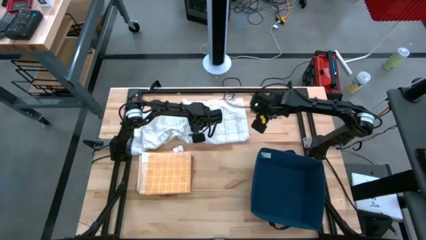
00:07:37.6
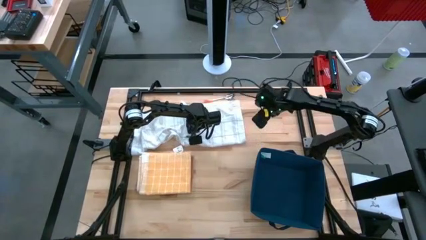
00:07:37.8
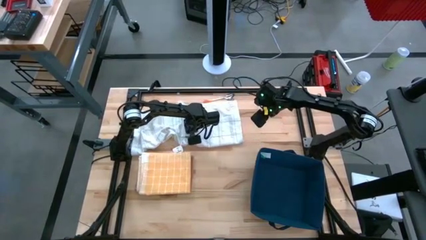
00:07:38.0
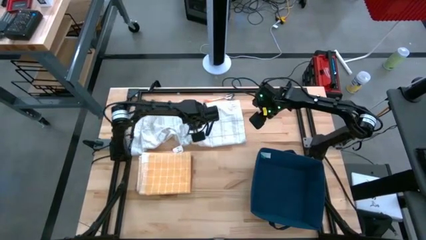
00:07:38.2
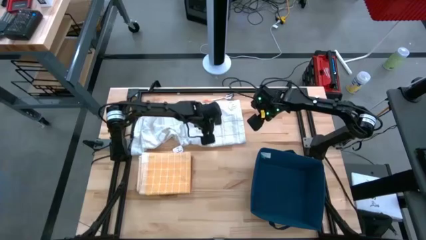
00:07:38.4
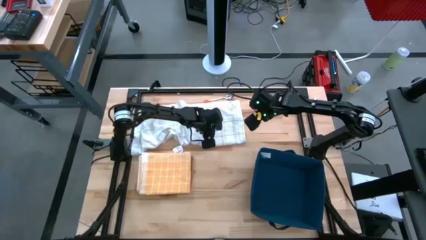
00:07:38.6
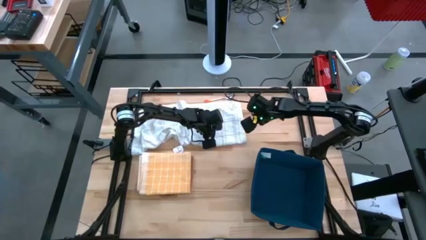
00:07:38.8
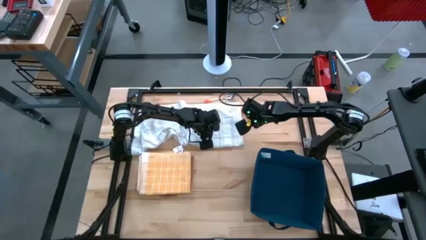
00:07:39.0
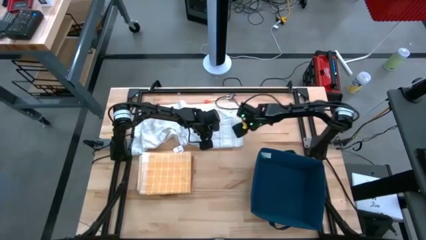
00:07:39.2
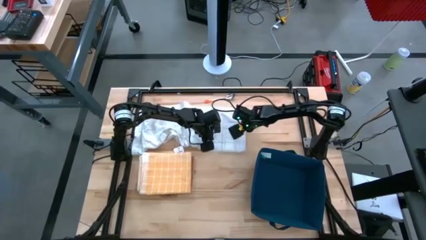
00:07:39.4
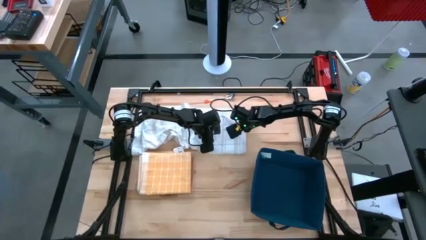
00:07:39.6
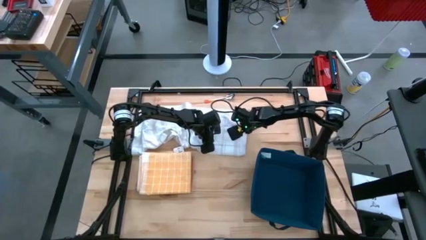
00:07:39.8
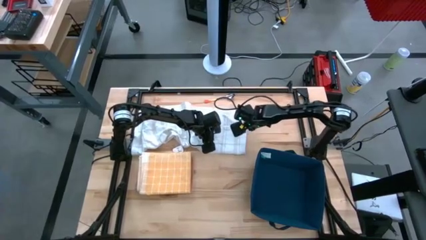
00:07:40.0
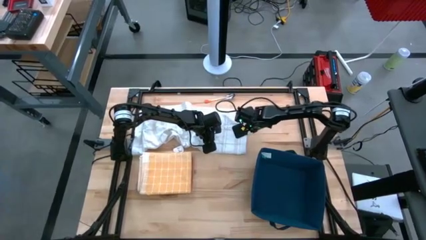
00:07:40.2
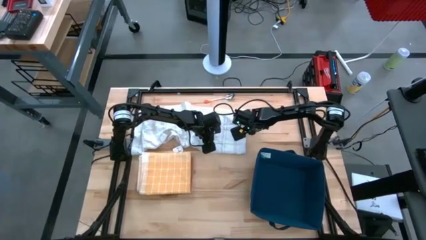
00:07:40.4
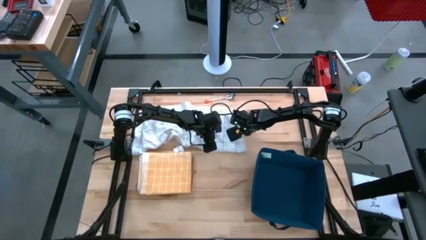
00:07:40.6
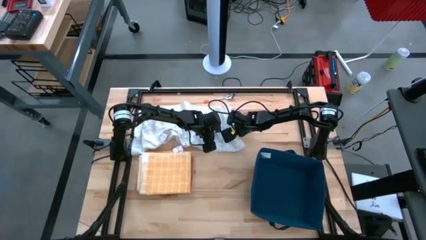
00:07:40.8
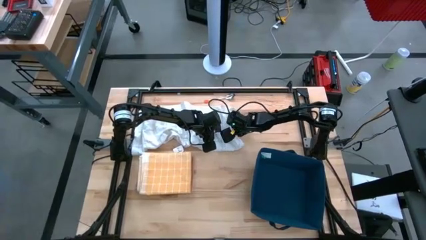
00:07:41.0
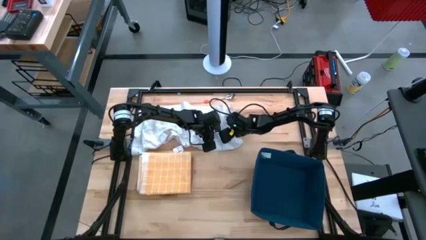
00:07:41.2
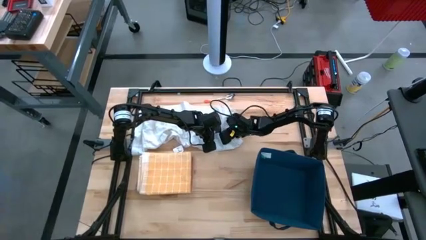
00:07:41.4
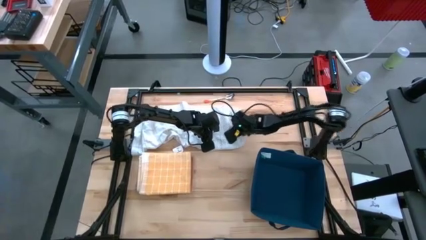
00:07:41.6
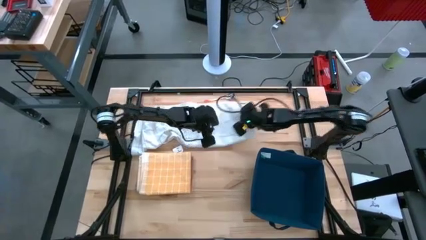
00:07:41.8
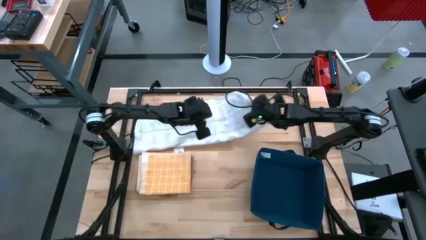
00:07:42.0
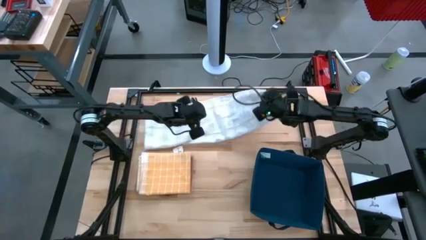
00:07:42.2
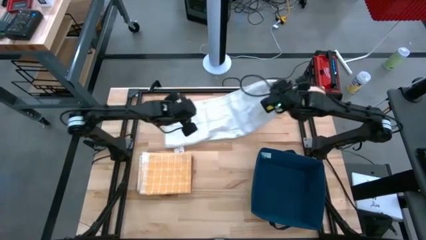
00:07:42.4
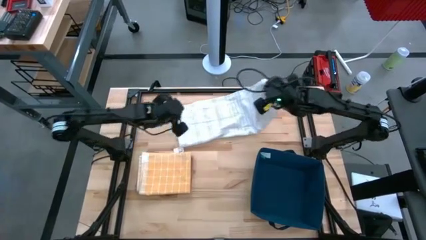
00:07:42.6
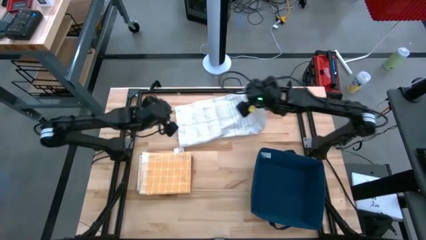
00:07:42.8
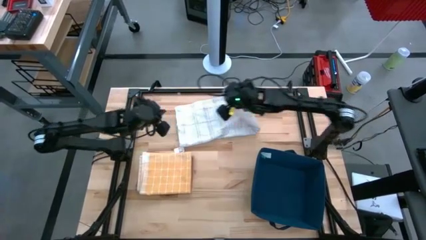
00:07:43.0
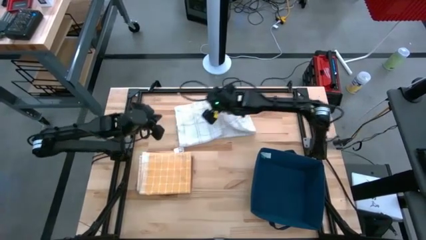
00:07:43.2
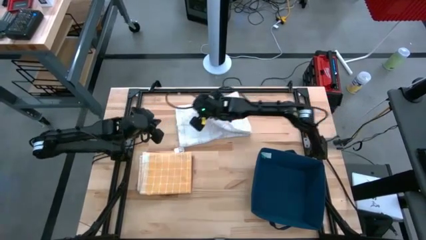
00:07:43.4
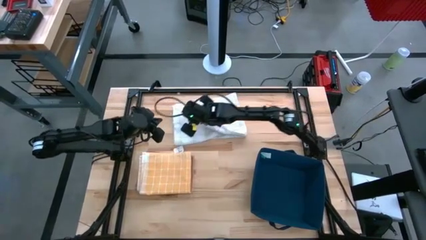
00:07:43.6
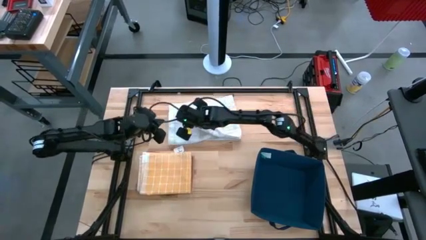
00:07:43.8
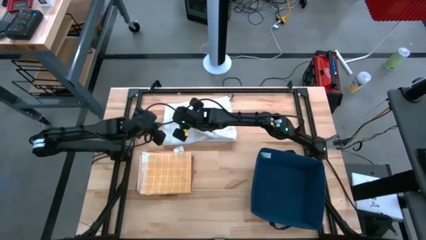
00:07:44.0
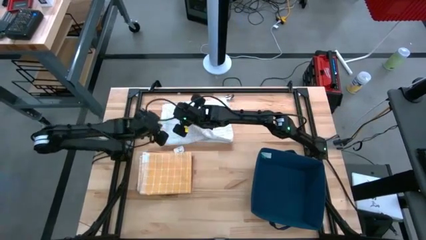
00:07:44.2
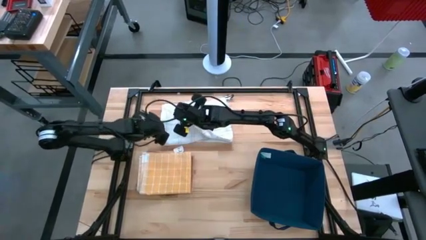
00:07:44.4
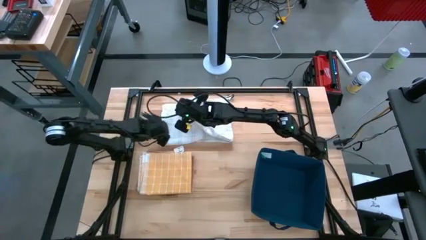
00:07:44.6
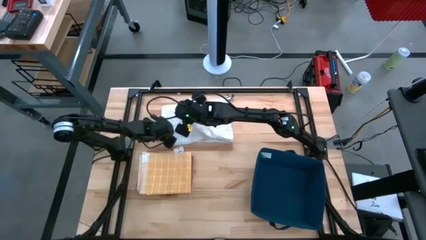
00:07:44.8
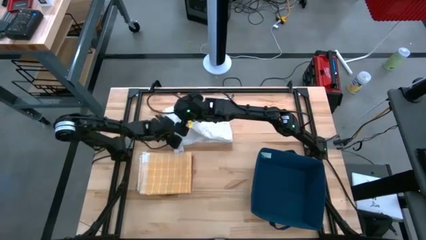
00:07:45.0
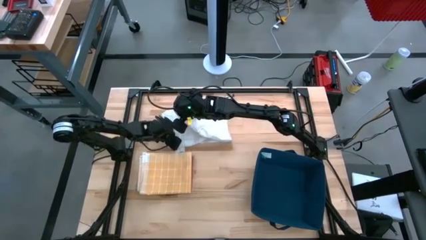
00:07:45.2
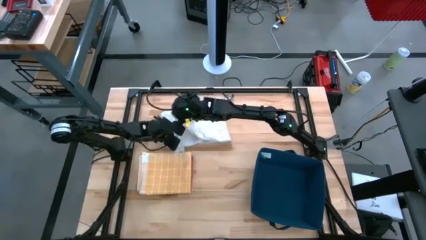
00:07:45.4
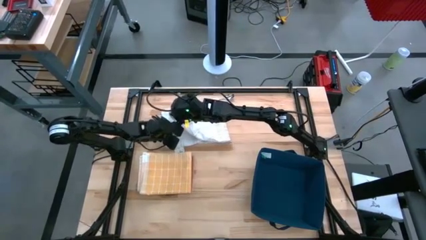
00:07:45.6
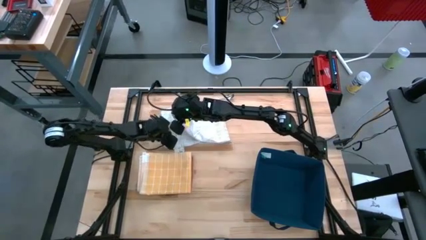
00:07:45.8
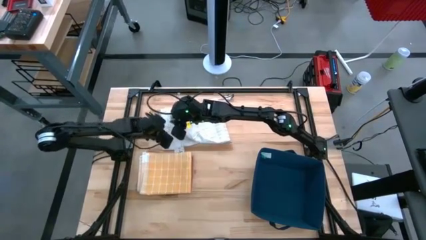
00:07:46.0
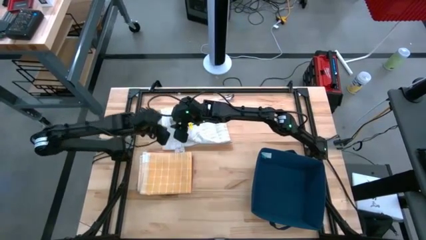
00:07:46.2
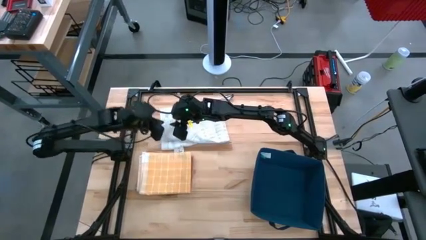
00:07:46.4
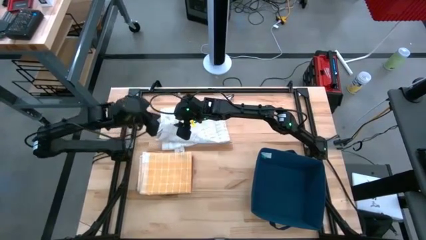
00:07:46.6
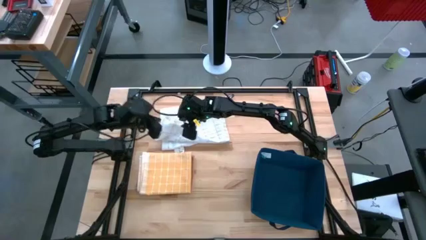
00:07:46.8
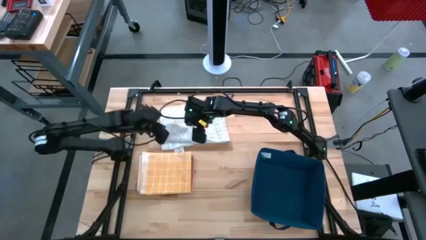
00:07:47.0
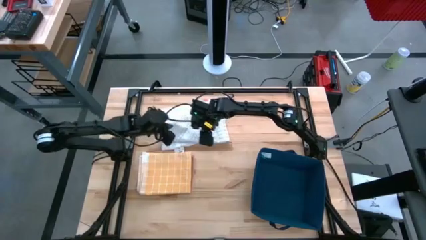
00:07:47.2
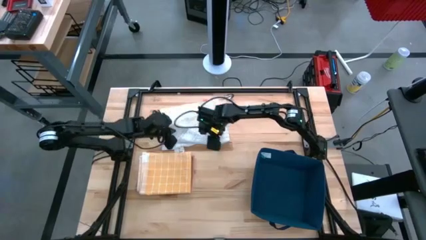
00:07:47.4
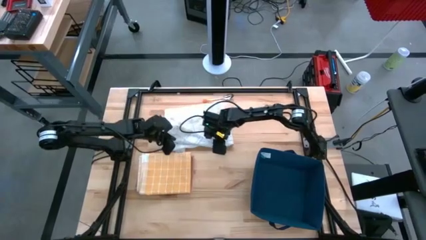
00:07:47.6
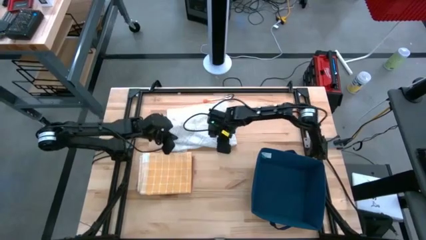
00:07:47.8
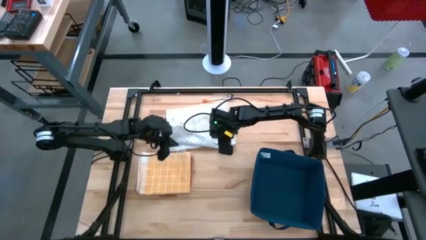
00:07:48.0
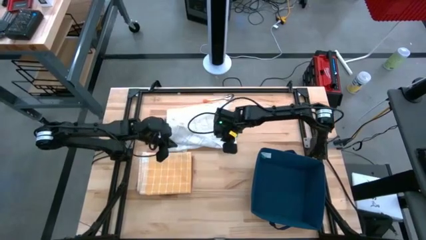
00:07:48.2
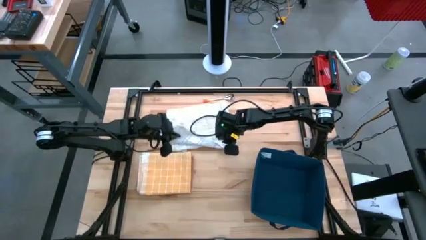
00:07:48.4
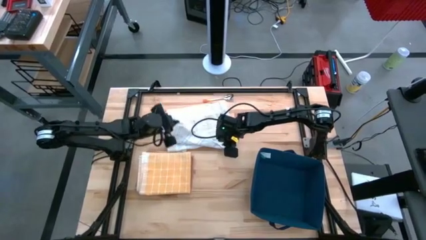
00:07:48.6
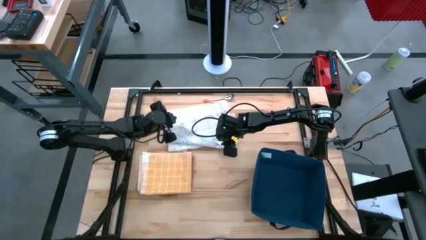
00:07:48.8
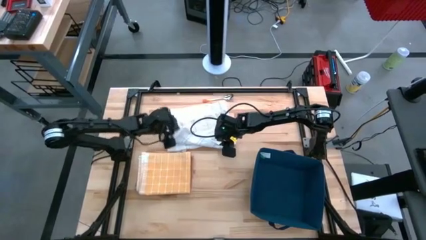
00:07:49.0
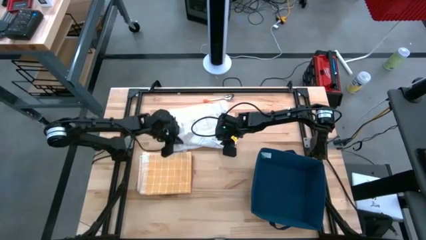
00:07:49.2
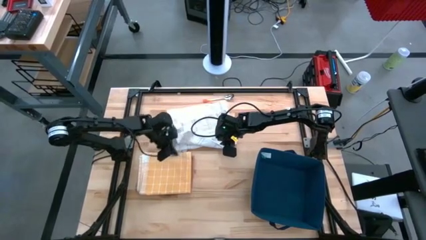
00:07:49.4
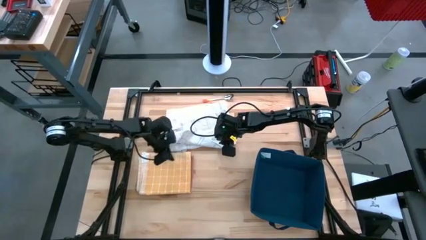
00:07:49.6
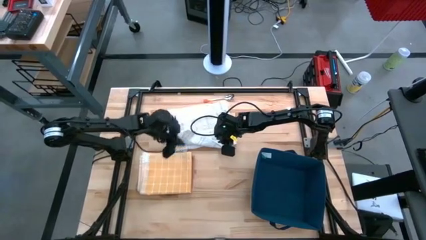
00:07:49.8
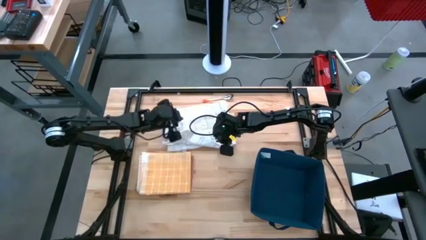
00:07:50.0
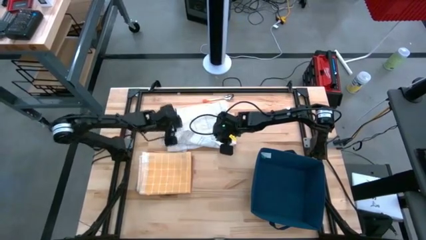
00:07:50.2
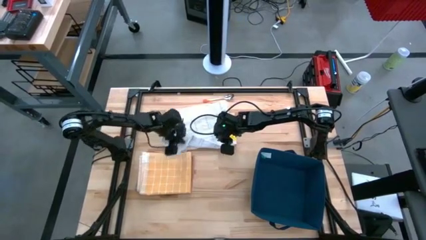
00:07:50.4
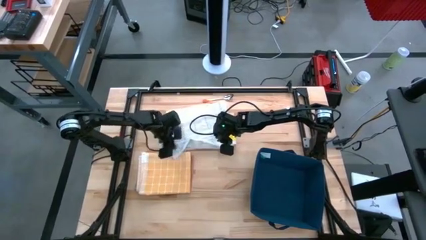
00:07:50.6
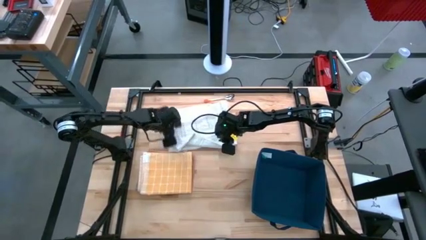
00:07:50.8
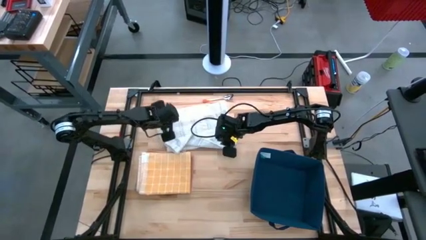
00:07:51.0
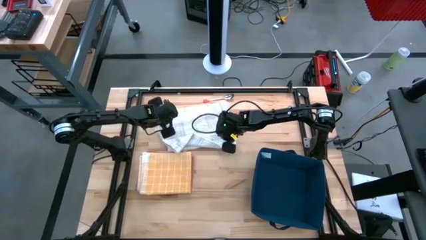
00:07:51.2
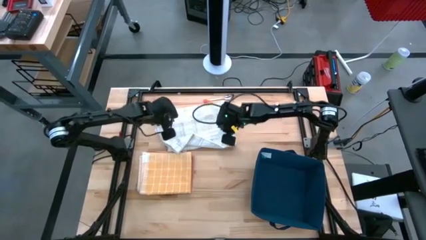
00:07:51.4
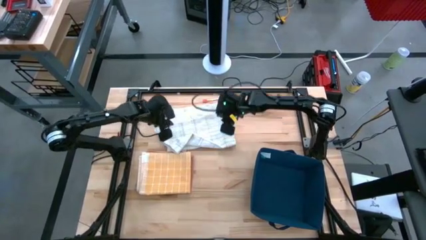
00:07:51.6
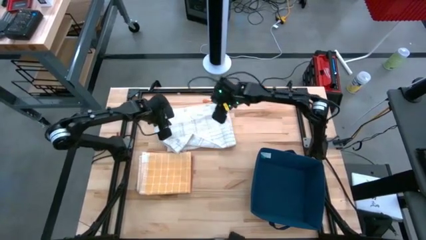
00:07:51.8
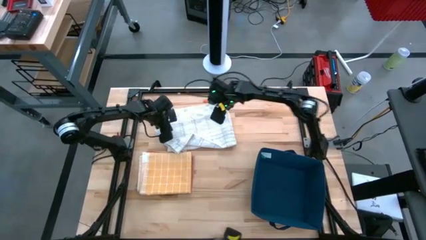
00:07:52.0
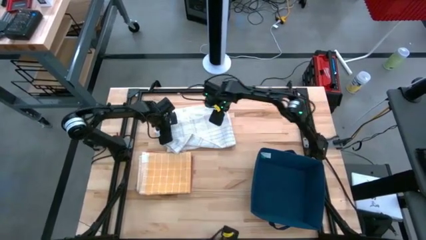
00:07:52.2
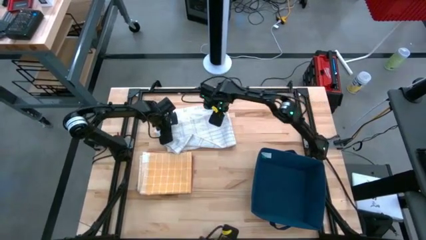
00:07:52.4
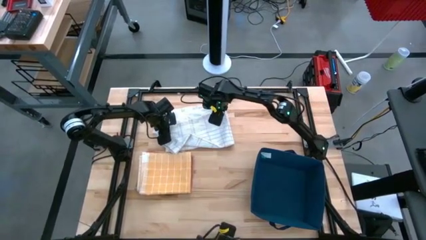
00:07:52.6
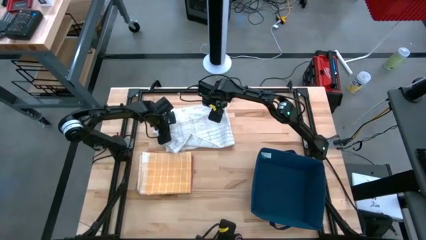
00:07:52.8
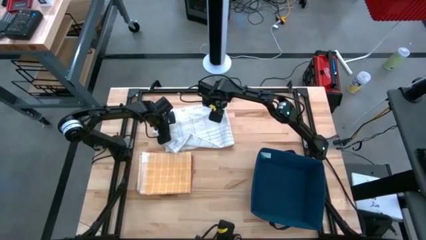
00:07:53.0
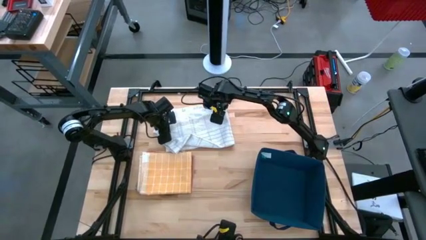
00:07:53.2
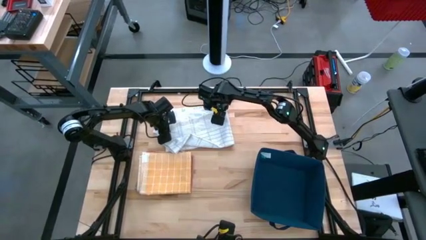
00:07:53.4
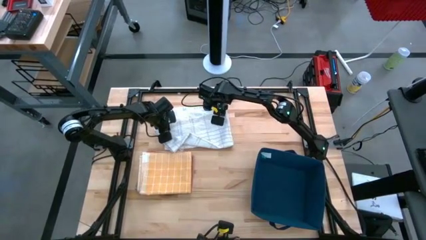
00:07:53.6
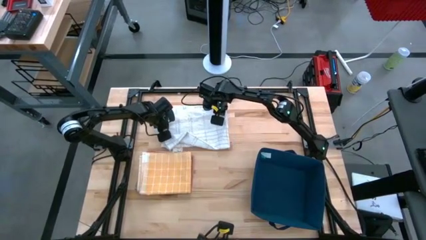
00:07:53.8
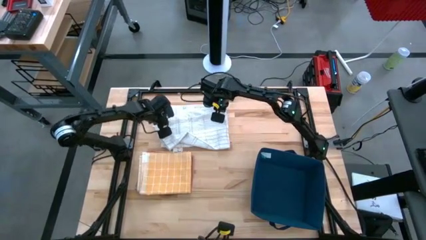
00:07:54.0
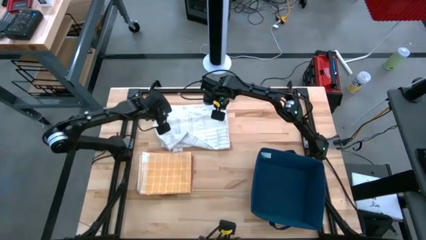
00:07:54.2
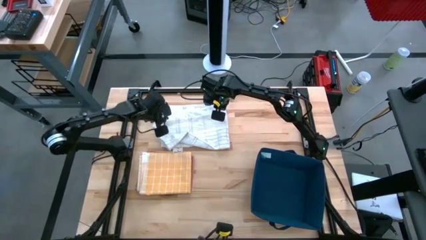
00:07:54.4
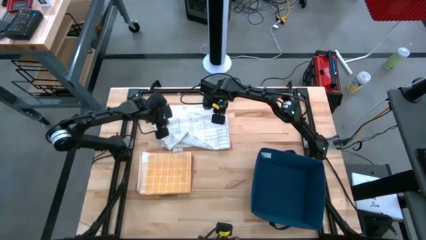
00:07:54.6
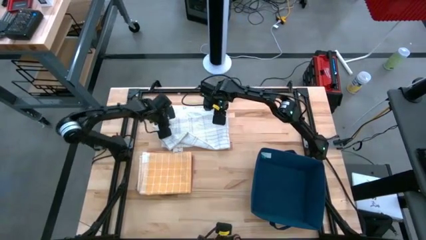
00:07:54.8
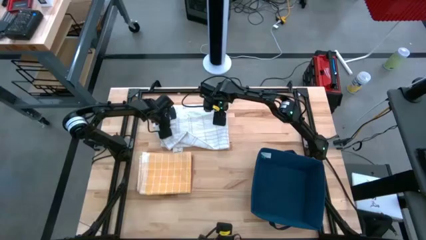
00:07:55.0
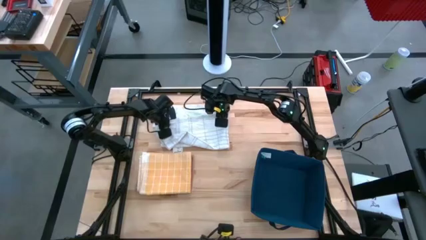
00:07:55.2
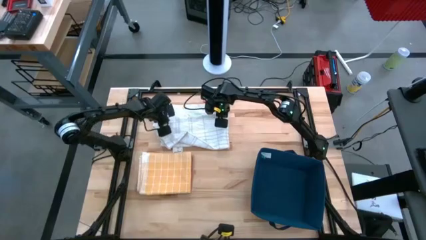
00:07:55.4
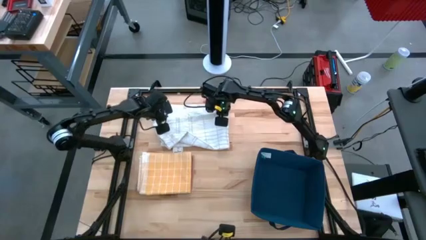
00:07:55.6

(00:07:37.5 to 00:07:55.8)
Task: Fold towel
Fold the white towel
